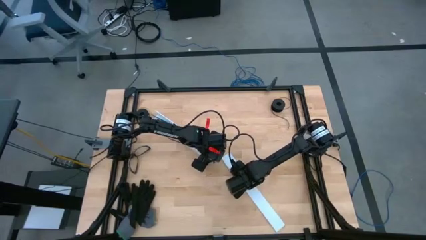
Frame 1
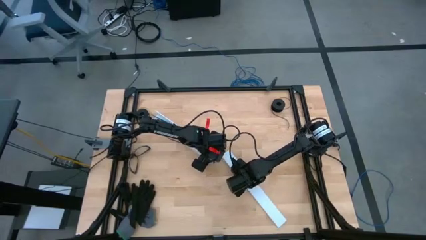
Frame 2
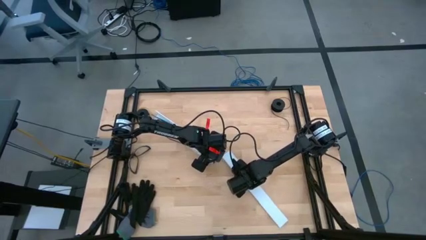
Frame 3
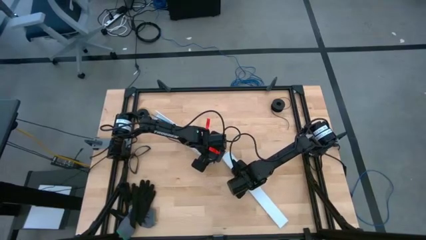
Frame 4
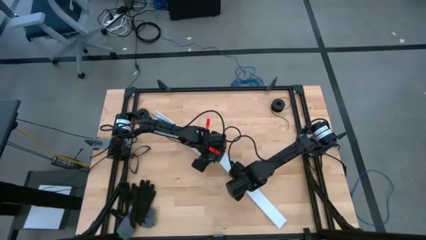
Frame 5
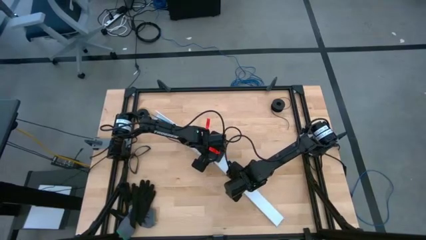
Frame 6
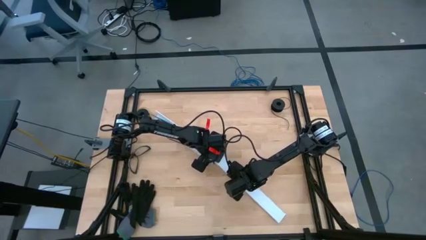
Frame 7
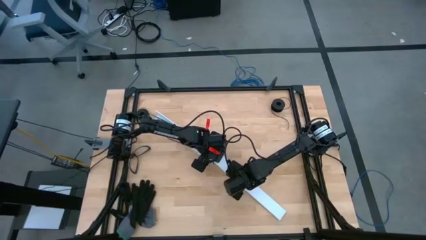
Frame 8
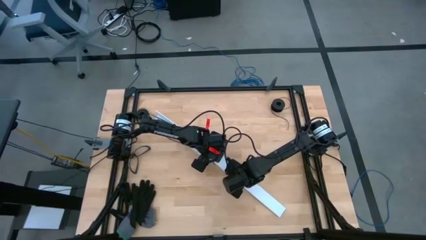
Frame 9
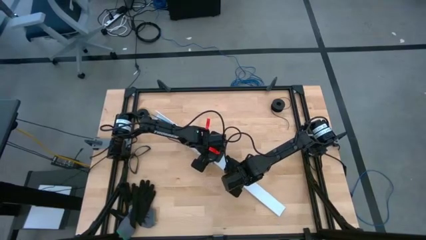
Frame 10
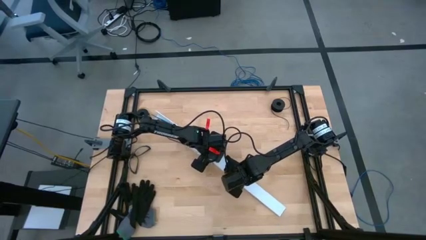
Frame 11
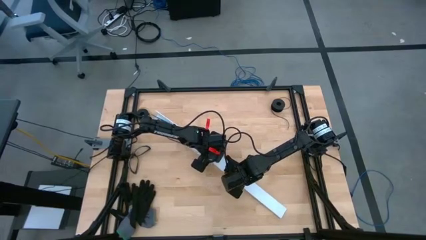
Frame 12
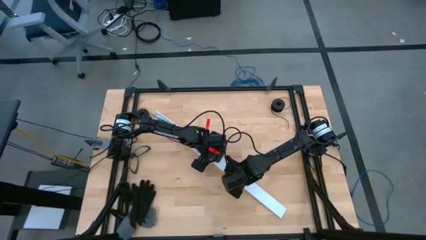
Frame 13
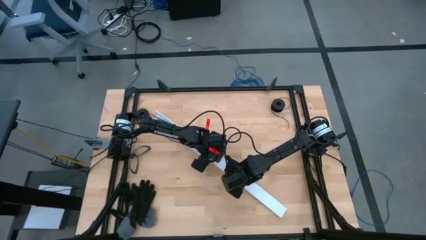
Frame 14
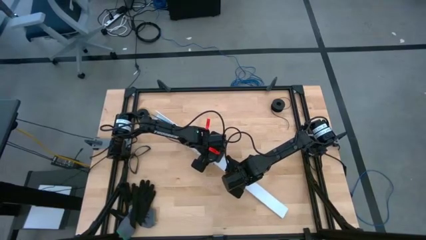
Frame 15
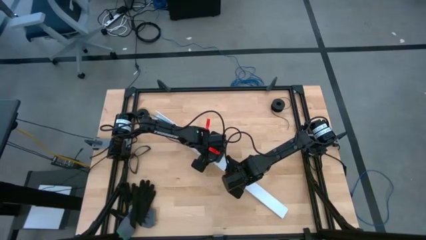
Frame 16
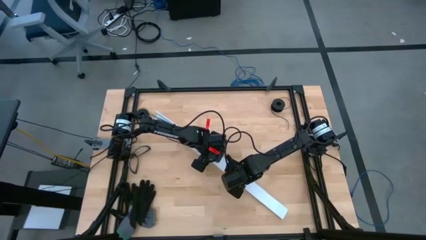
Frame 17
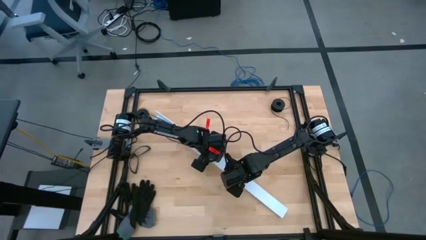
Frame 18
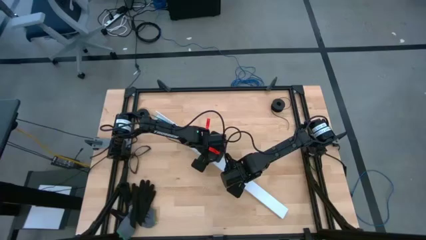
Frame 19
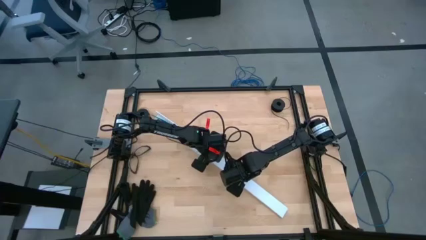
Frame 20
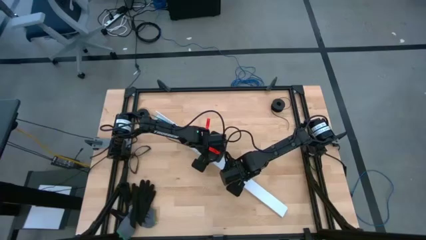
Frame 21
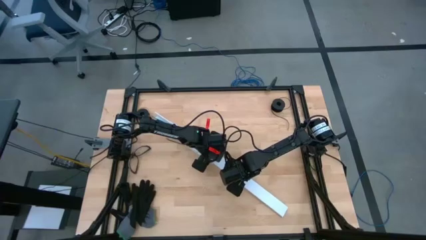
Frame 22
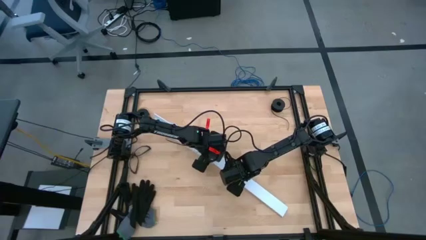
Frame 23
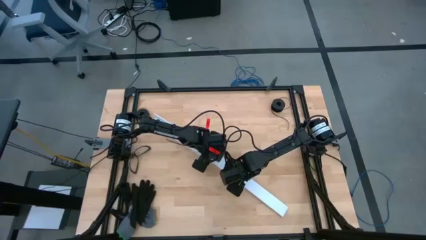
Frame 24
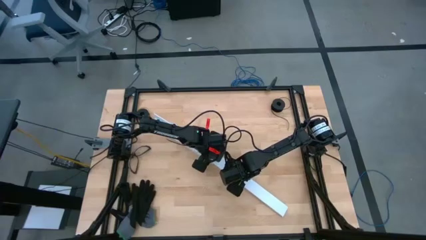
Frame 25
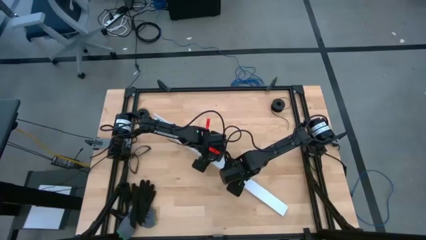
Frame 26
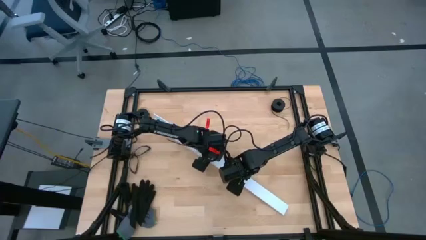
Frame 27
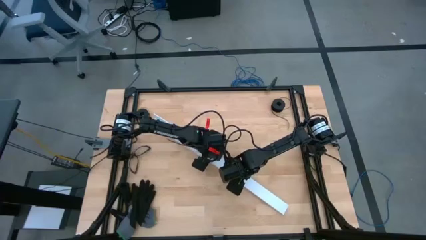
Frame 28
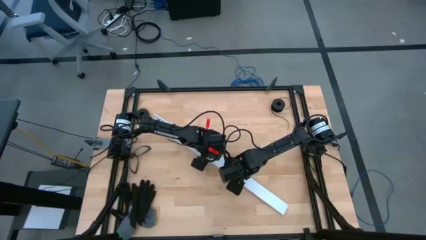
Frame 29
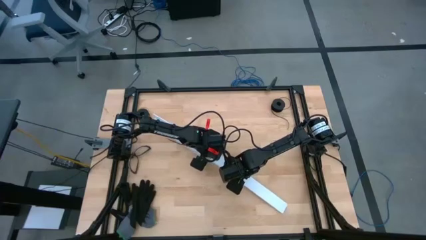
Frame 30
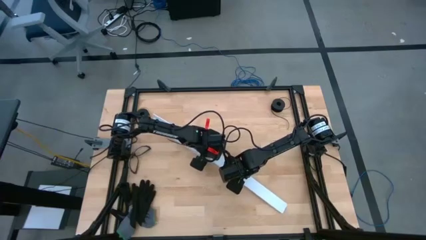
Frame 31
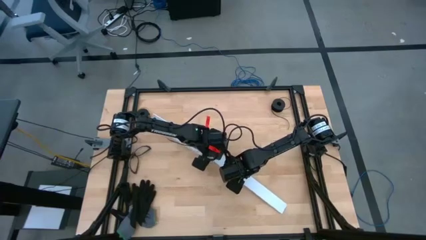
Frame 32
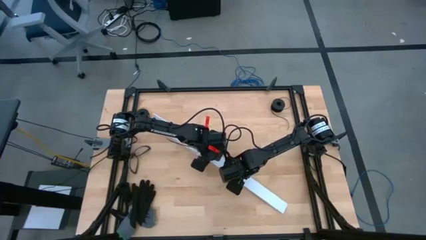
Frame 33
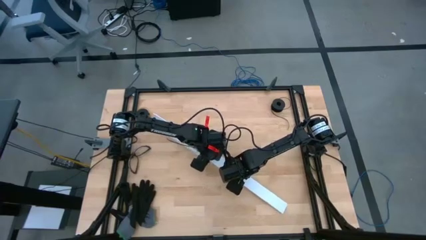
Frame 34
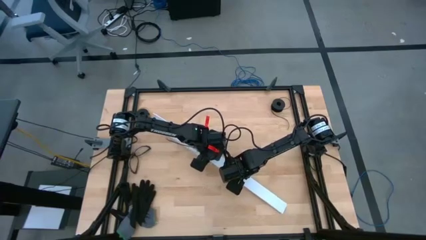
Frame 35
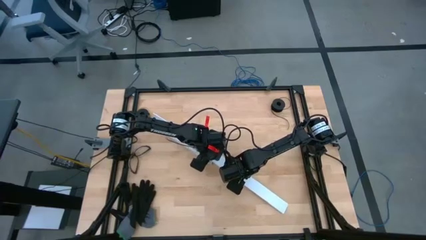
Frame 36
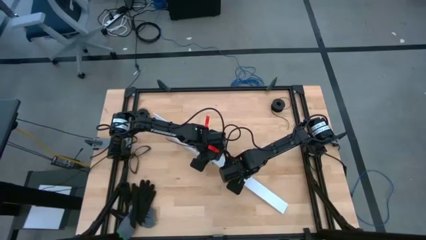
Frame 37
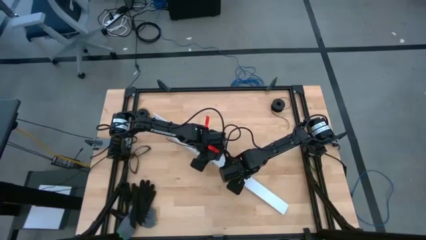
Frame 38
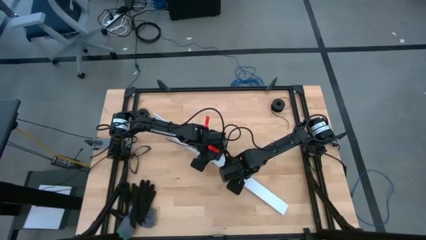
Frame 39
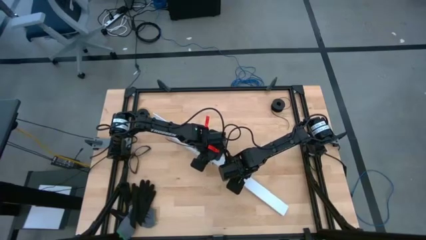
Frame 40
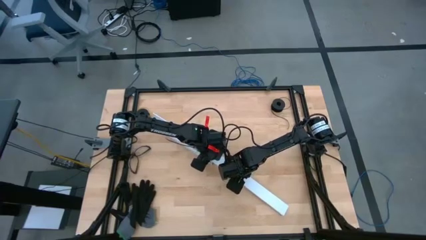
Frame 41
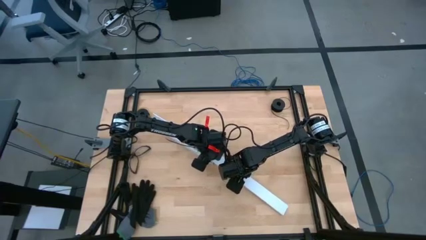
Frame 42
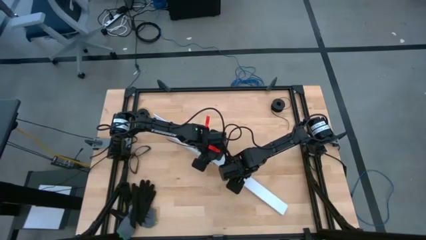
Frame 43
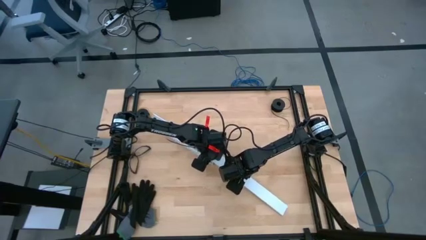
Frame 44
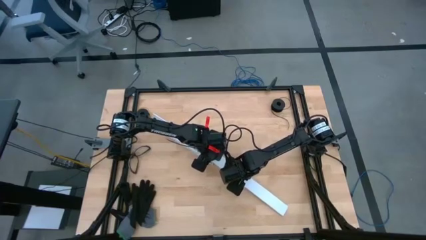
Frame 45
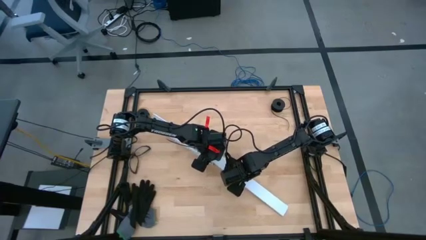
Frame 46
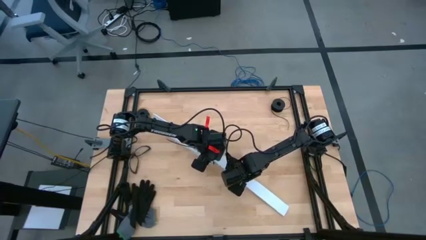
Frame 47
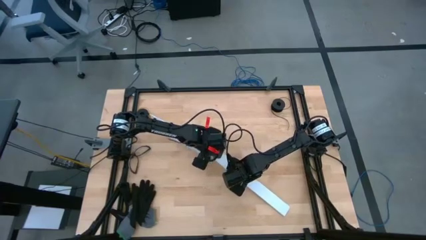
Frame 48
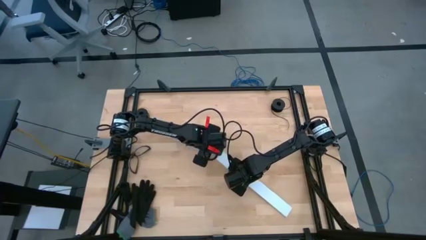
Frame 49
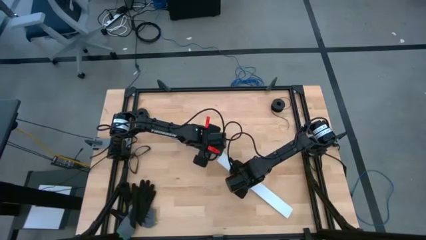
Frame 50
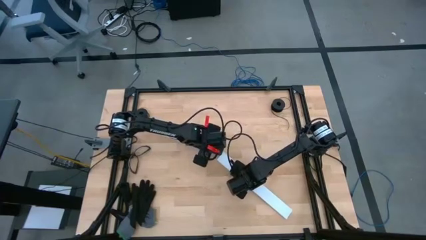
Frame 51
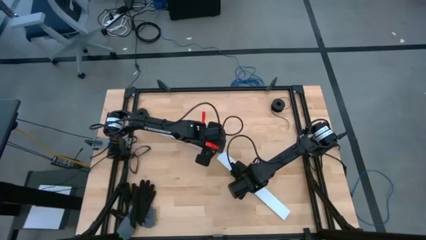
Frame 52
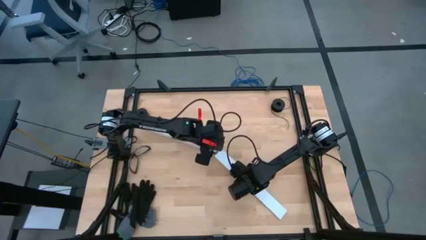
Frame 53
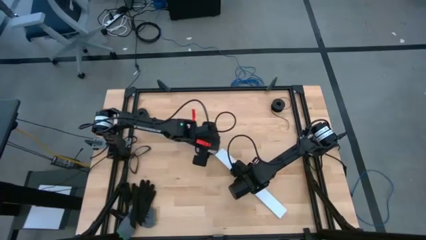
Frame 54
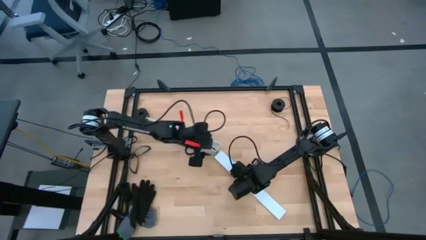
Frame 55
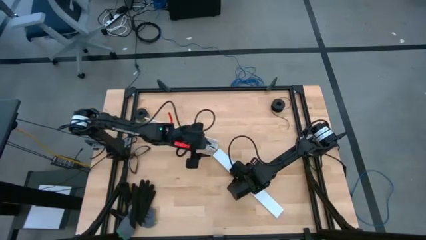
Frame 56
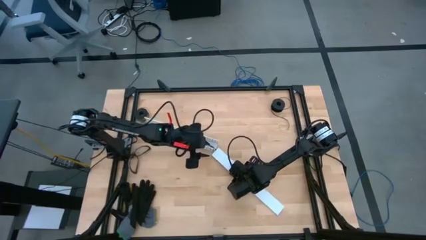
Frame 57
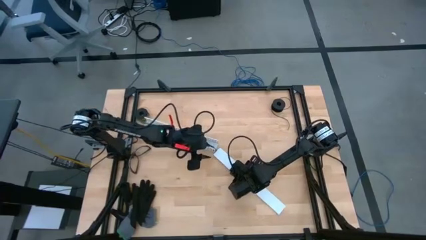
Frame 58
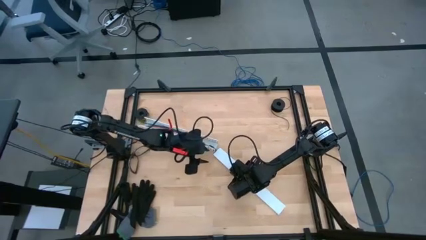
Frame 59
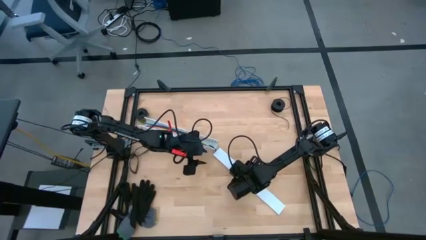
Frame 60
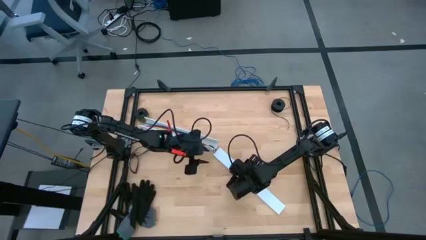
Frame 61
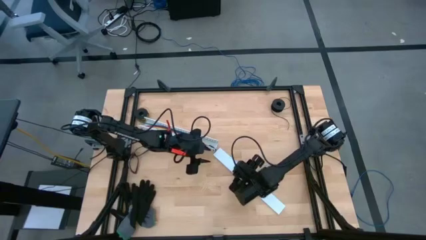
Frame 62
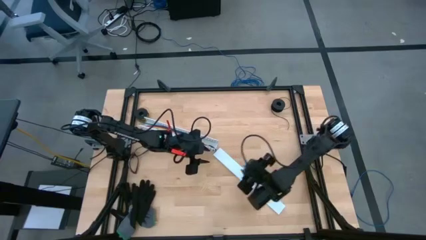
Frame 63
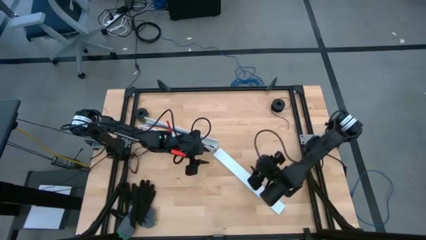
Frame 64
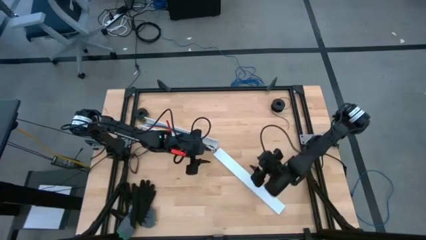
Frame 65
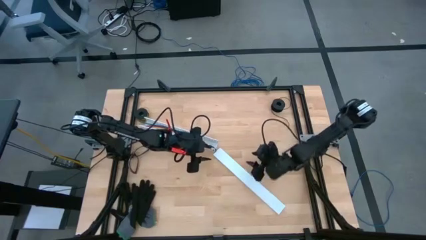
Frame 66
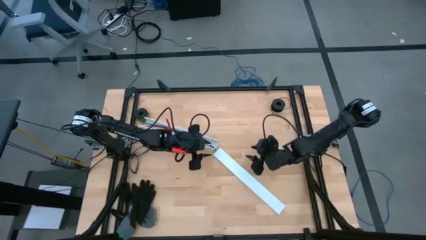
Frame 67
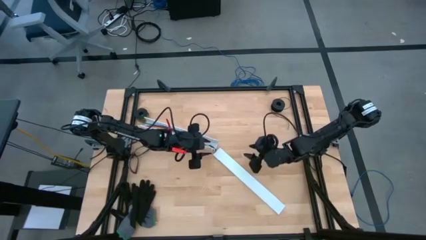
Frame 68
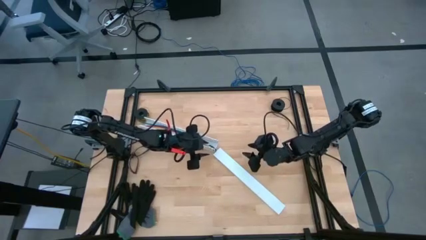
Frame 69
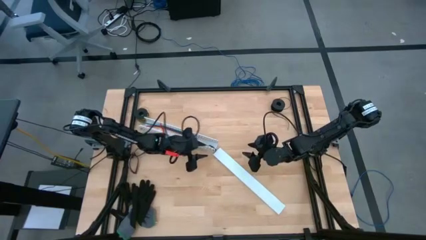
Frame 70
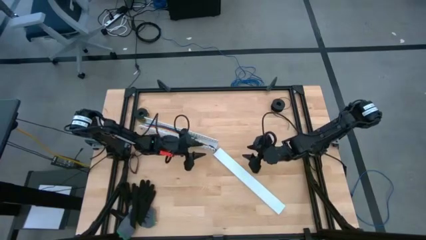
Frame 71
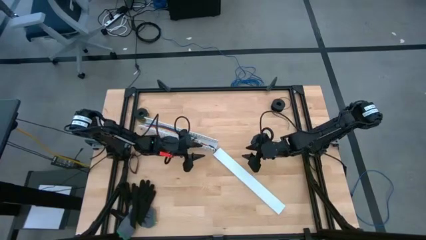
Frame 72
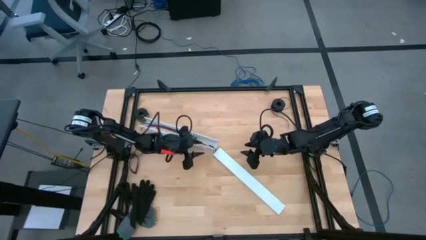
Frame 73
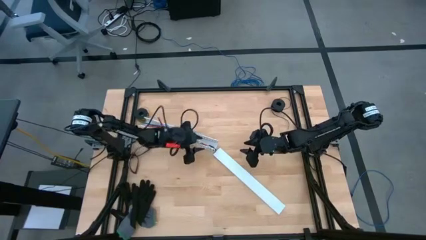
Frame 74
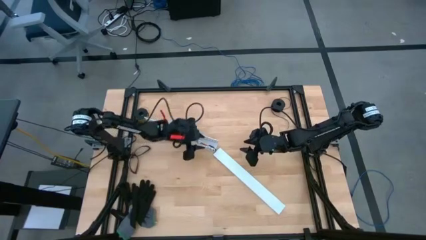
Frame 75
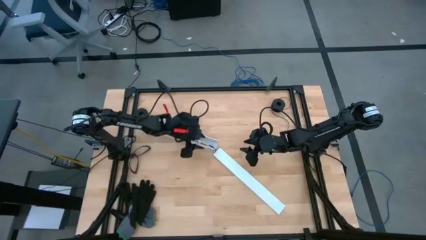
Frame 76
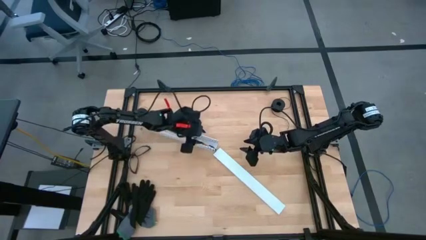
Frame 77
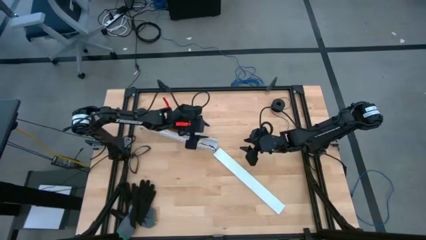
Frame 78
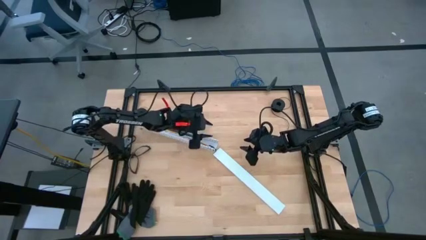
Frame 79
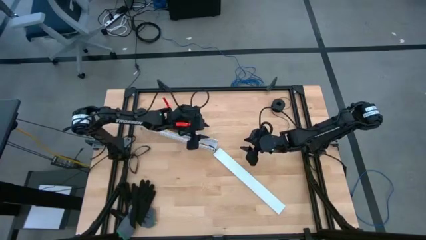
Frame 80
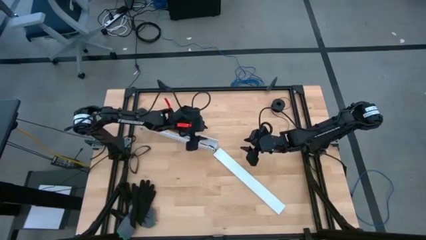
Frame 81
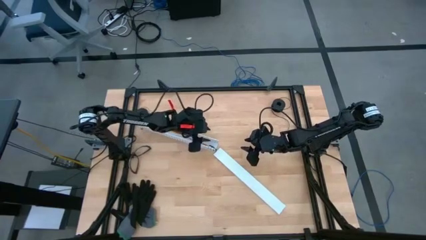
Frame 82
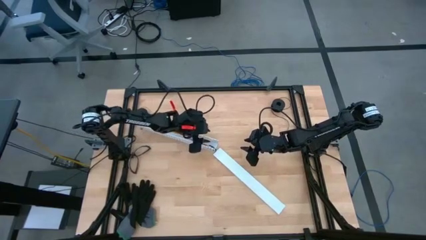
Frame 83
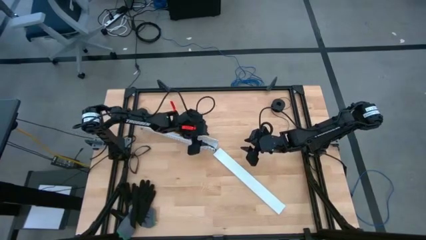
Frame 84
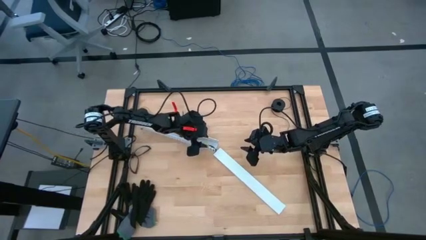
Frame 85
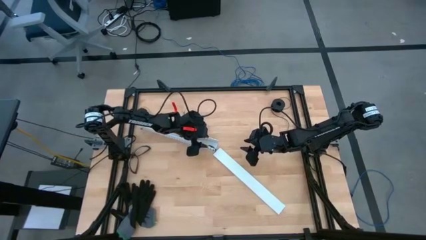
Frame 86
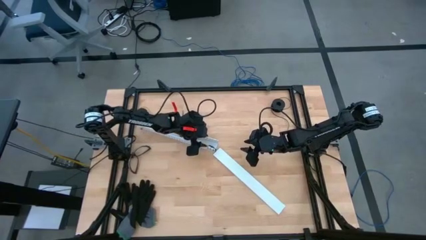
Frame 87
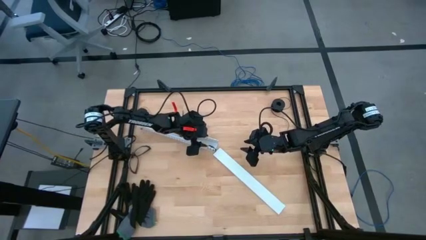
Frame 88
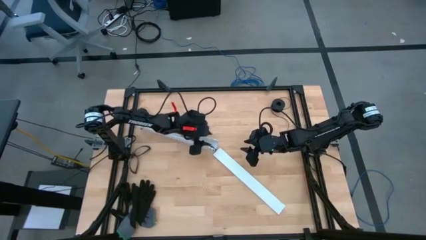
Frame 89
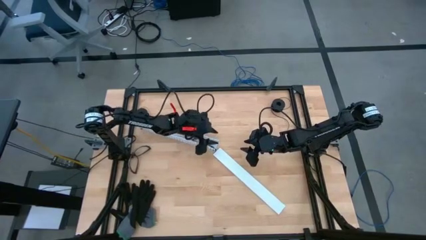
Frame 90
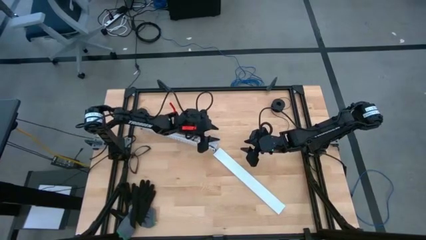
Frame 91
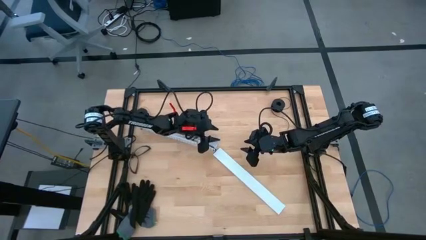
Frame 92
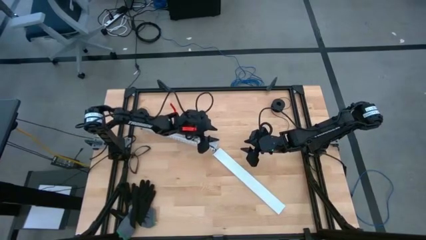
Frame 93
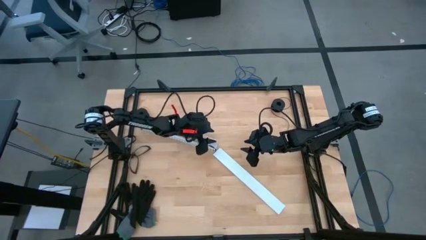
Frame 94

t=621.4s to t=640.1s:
Task: Ziptie cables
Close the white cable duct
